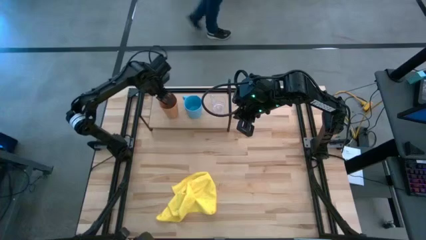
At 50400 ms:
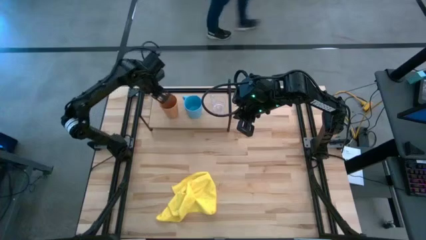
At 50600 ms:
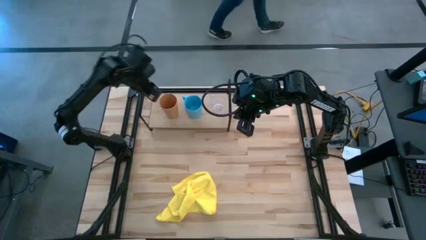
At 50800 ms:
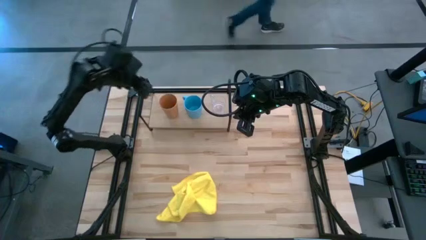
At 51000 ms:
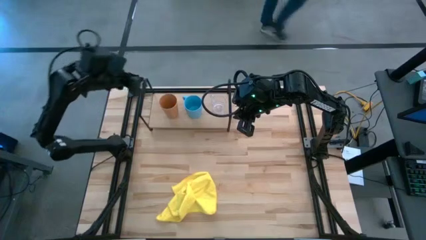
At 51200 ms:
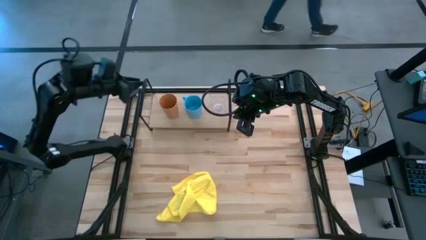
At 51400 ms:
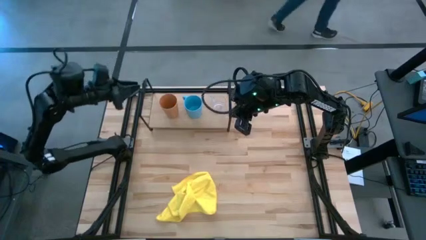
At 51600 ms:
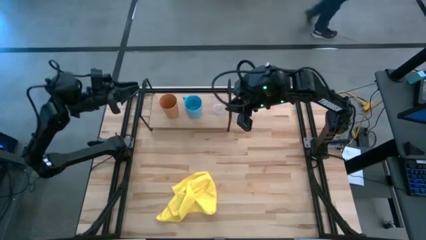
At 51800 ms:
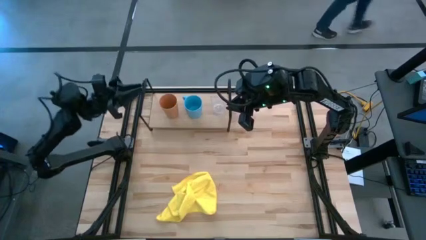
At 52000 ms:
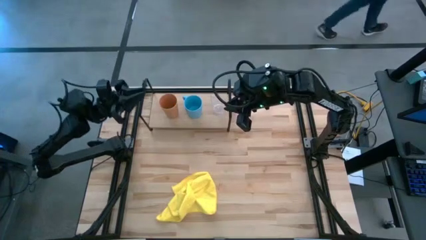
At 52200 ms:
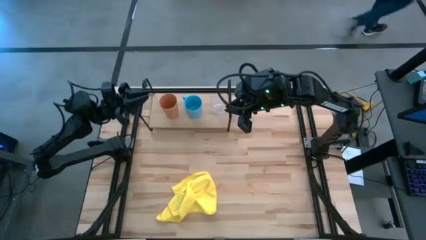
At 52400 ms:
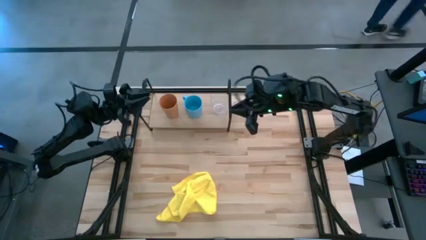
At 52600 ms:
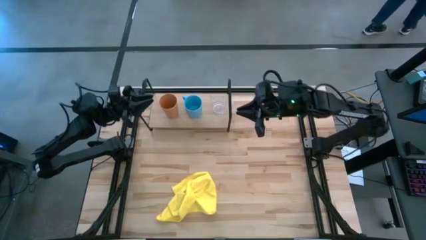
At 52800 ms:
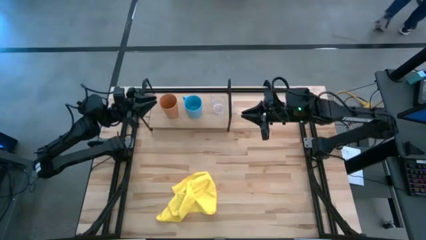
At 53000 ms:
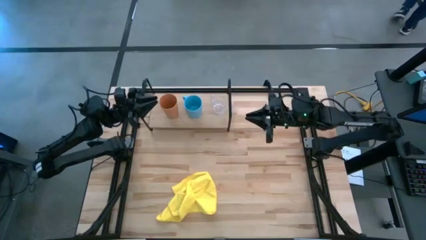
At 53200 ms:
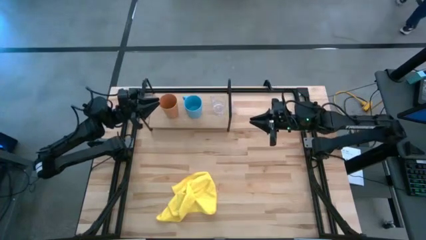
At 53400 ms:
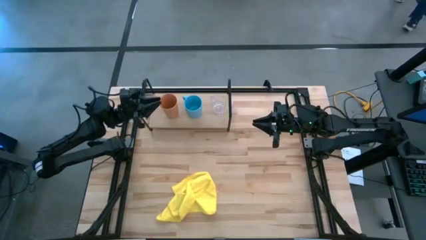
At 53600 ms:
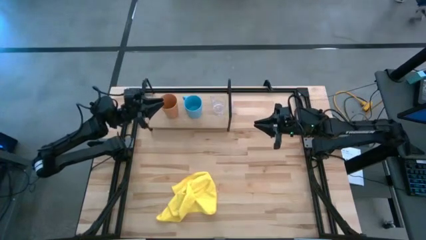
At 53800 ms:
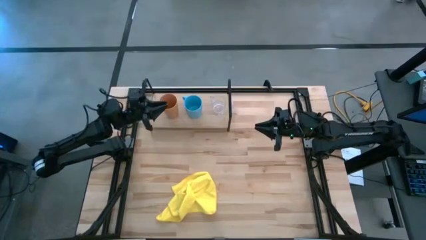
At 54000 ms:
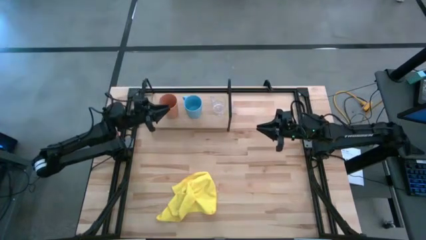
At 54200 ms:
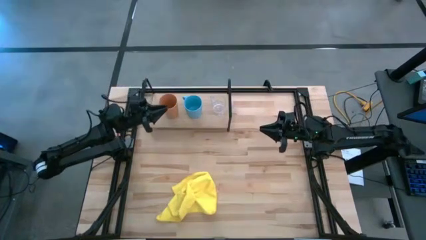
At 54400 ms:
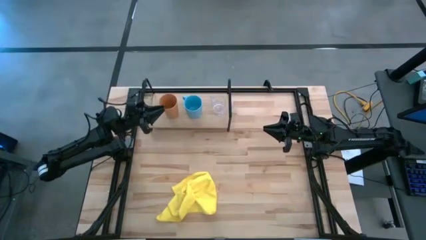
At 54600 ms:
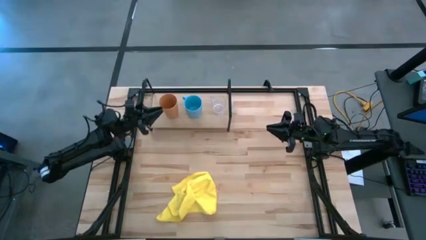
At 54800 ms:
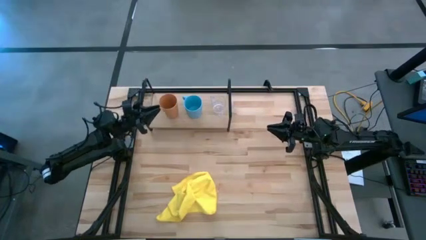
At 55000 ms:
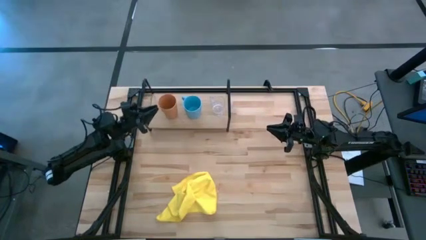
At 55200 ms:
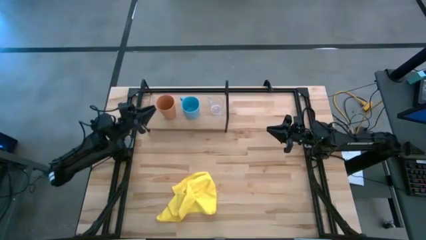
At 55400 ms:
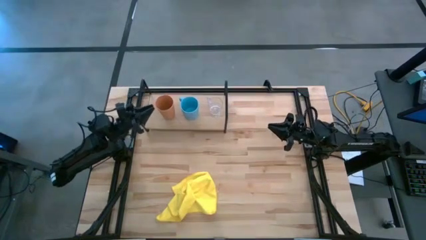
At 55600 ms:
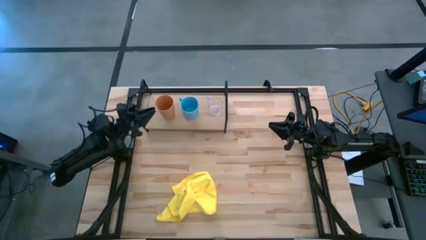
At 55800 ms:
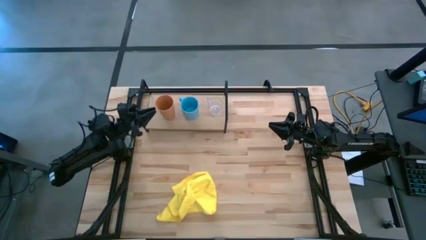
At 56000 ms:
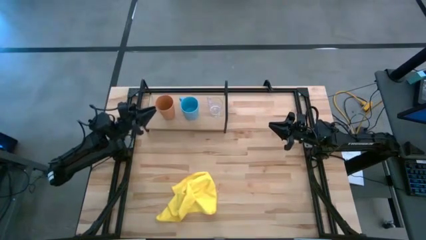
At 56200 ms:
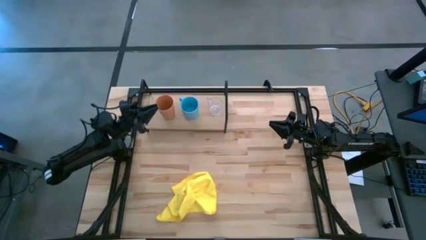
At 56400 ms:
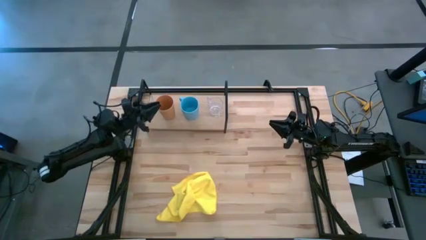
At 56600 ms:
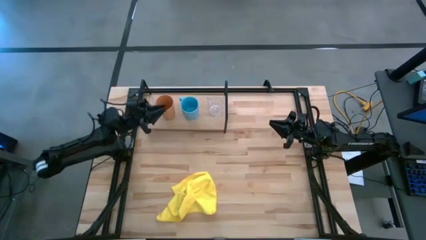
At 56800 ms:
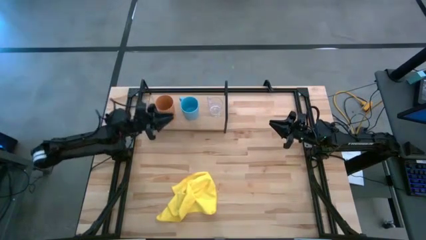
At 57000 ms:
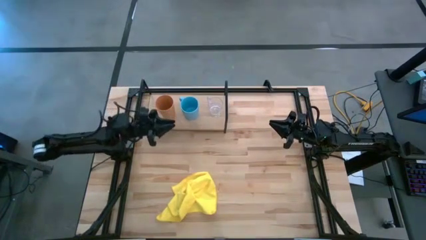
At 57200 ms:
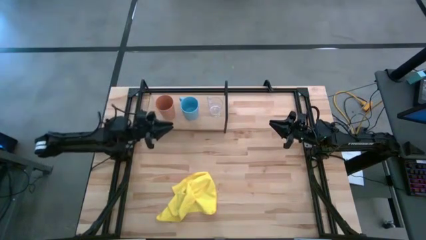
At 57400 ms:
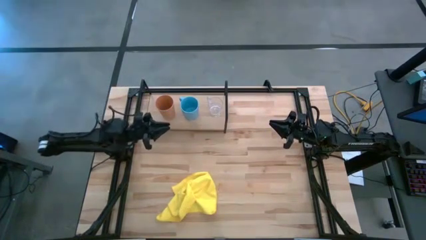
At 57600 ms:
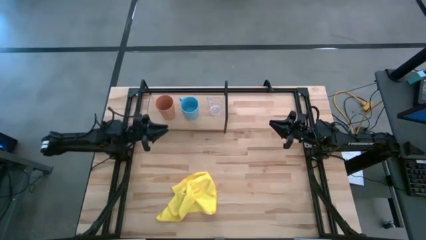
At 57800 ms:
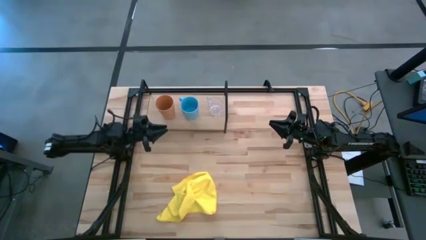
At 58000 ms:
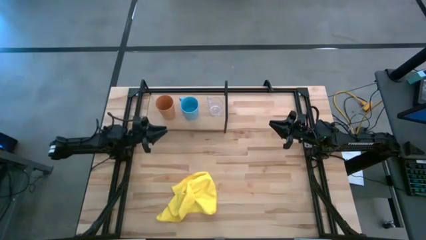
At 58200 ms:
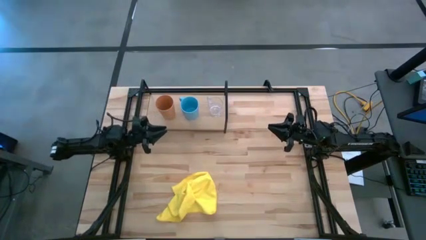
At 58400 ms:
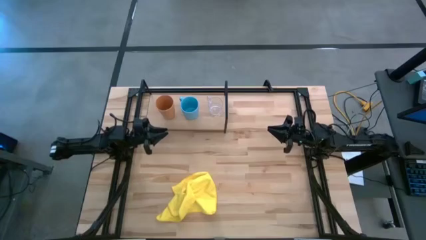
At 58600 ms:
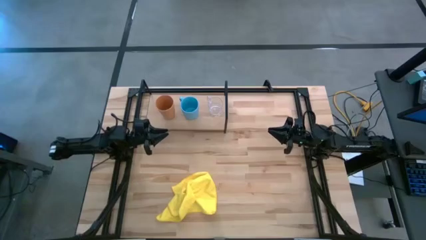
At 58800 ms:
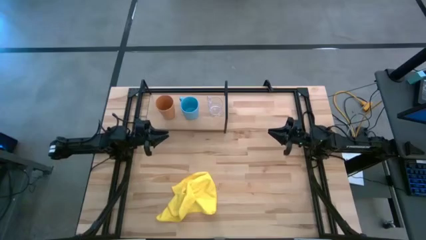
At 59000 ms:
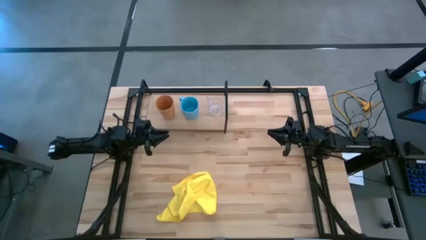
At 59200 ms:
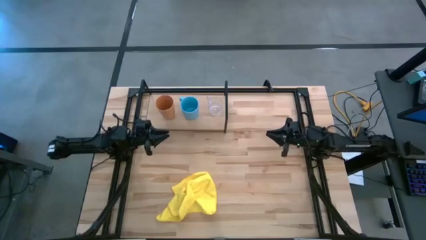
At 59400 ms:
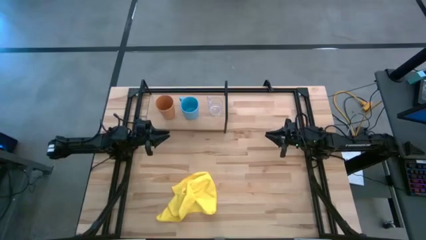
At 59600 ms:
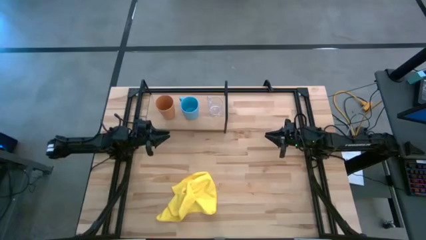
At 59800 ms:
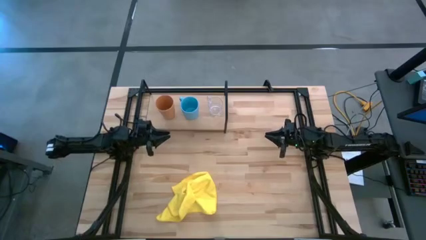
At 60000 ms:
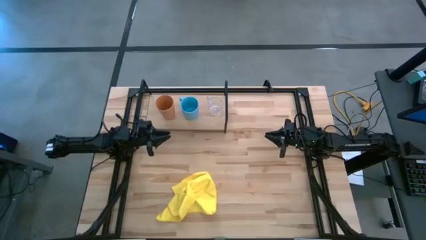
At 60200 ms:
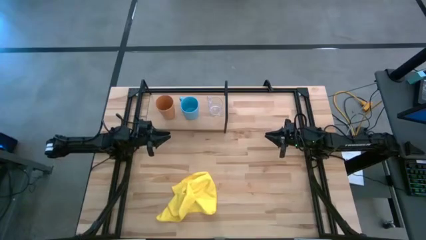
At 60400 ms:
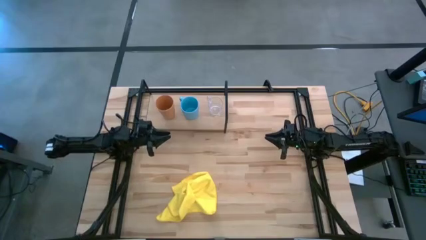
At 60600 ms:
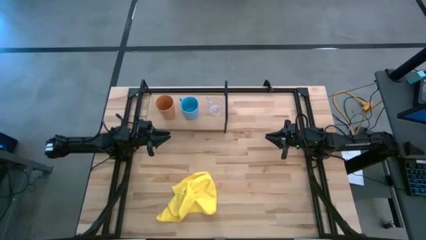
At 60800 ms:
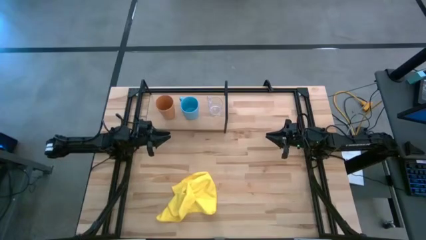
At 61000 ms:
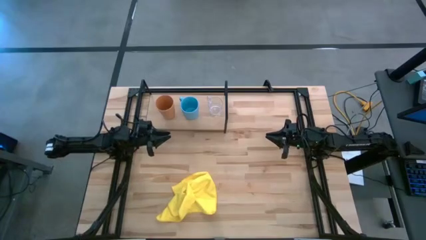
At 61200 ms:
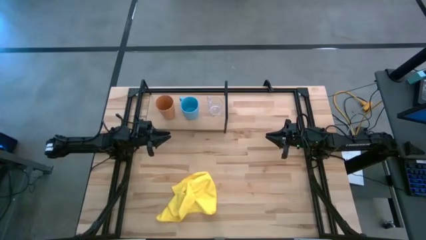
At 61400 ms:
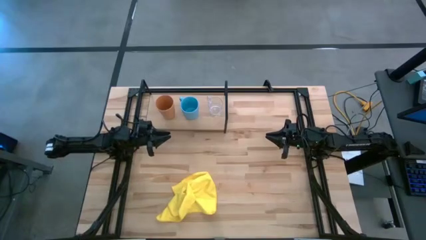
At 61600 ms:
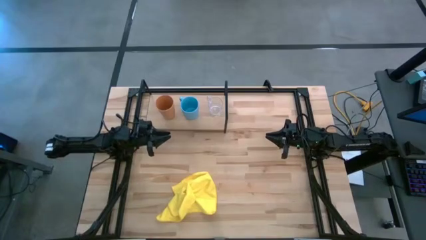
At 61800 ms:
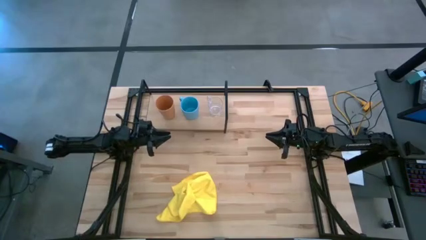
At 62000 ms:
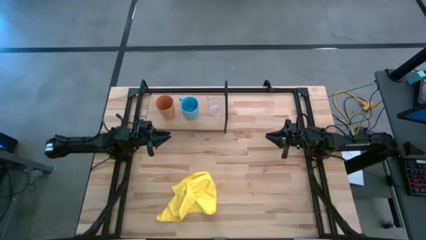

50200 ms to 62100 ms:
Task: Stack small to large cups/mugs on shelf
Return to Home Position

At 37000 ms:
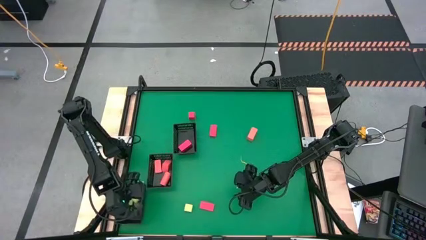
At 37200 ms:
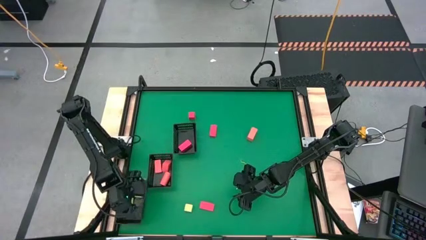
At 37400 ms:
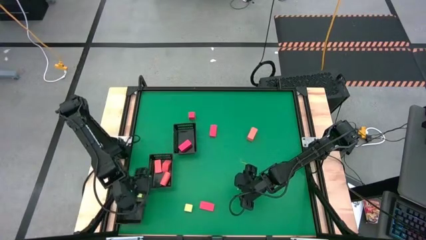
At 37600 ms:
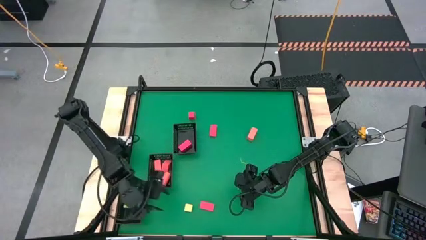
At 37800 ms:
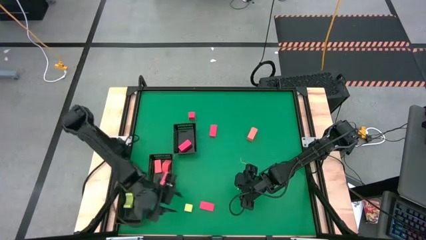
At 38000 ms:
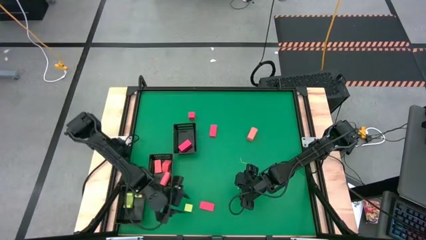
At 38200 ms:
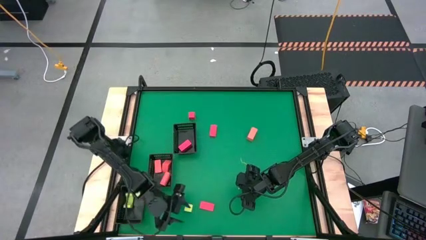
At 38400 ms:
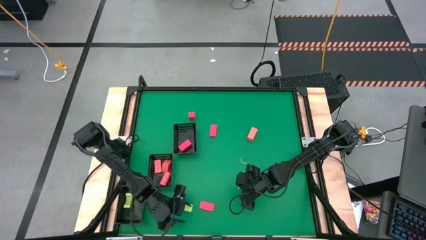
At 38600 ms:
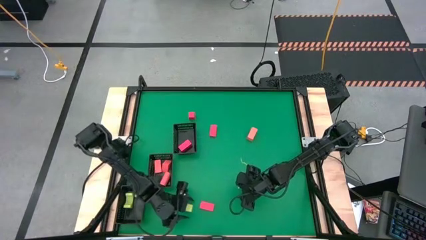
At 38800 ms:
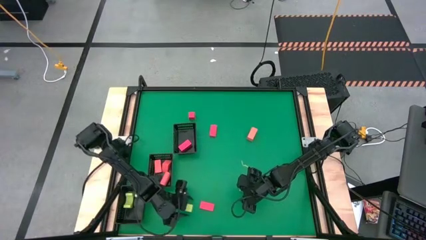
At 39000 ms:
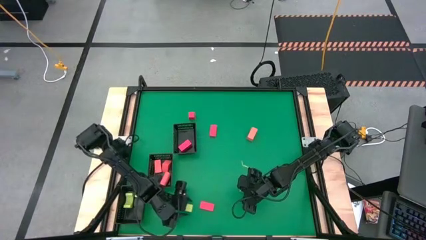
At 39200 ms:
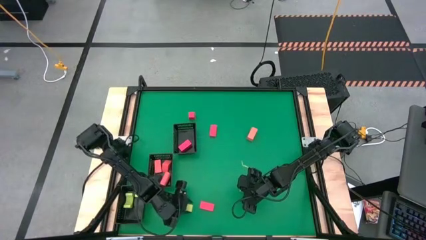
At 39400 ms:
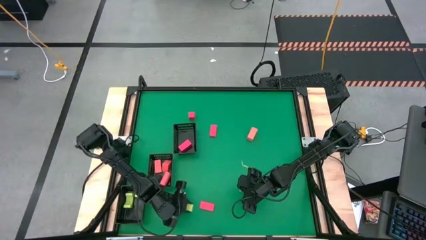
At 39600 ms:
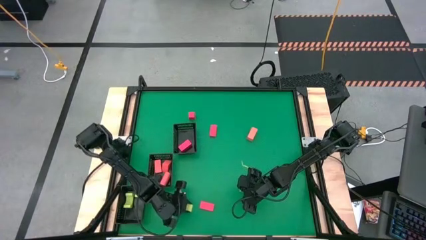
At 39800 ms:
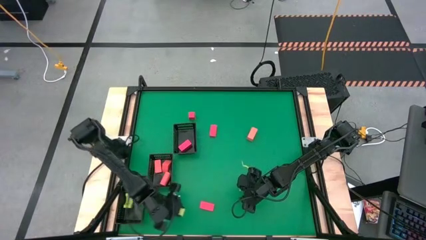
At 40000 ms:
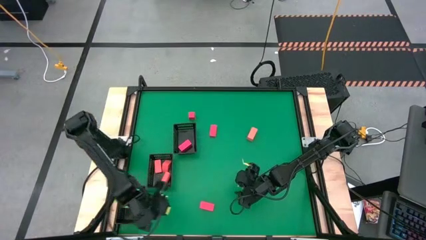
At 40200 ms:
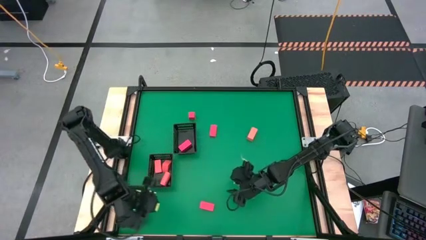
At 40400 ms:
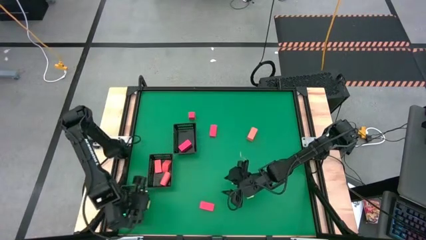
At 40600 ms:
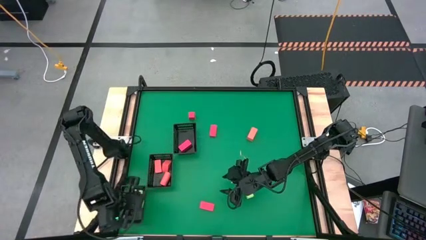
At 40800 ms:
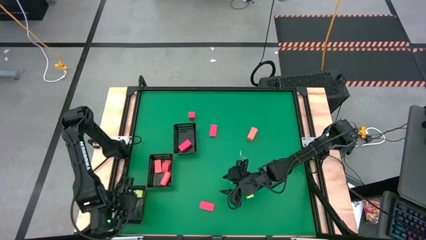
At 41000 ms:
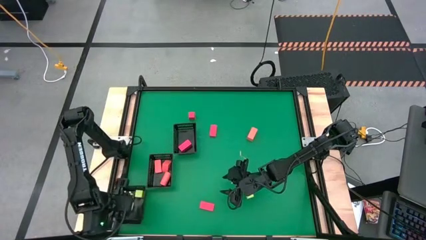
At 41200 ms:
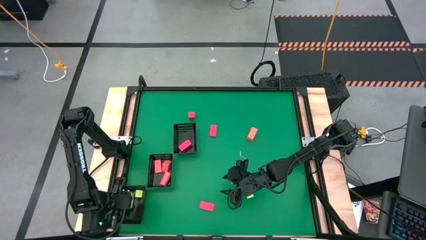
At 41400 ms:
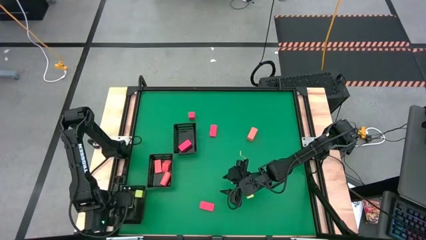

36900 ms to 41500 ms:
Task: Sort & place blocks by color
Put the green block into the bottom black bin
